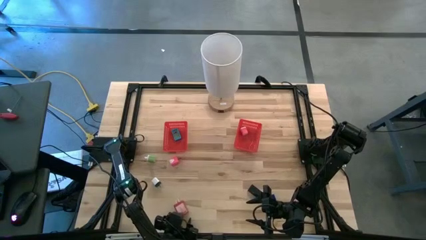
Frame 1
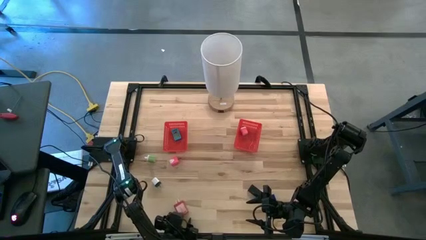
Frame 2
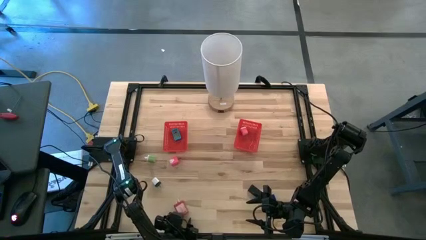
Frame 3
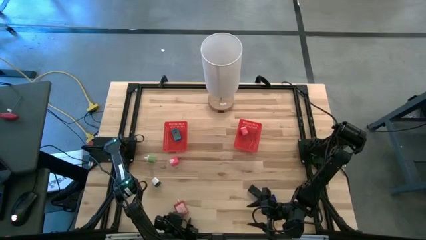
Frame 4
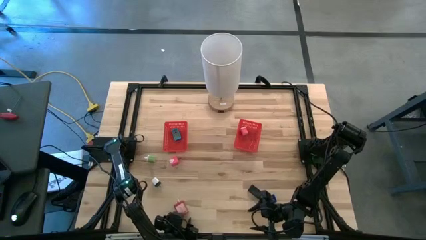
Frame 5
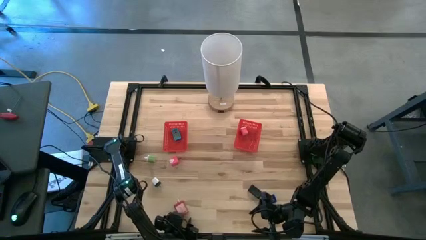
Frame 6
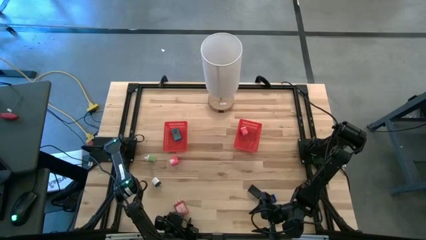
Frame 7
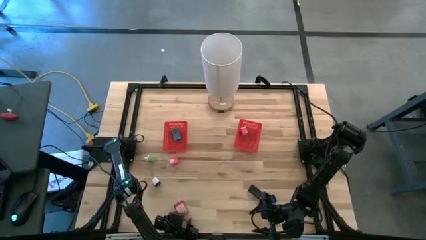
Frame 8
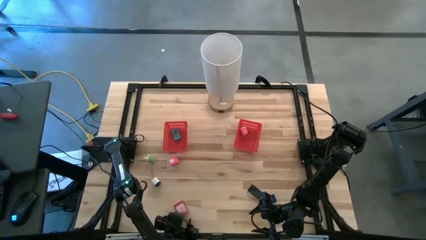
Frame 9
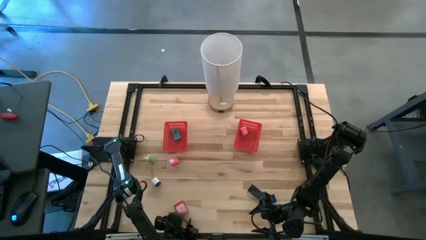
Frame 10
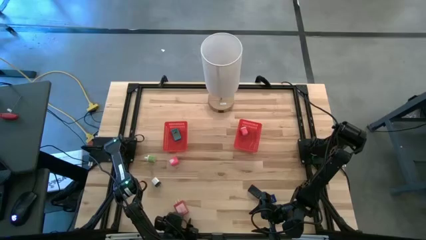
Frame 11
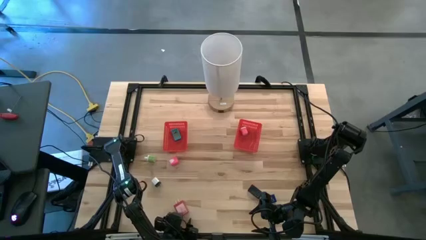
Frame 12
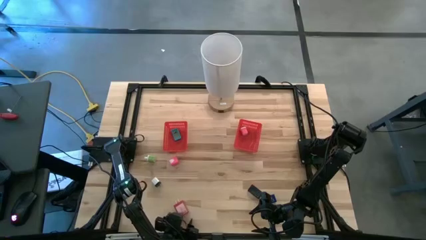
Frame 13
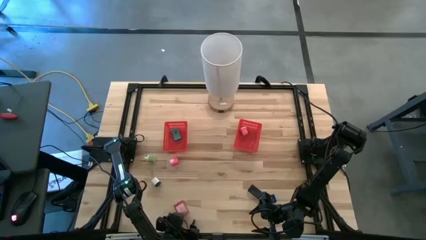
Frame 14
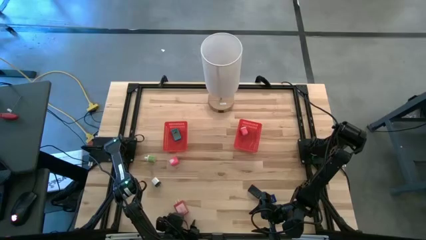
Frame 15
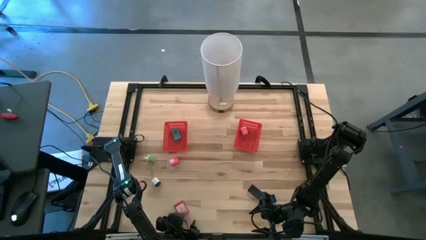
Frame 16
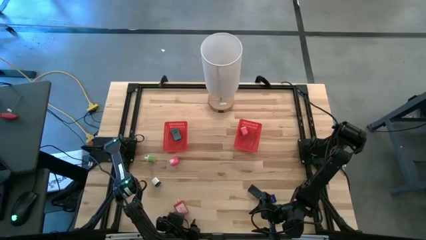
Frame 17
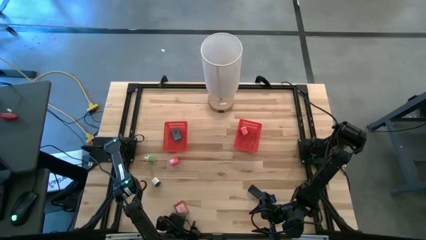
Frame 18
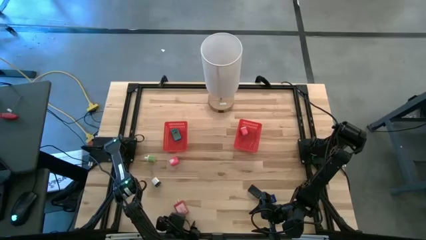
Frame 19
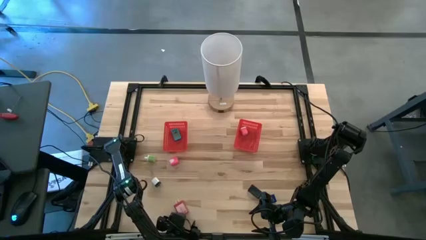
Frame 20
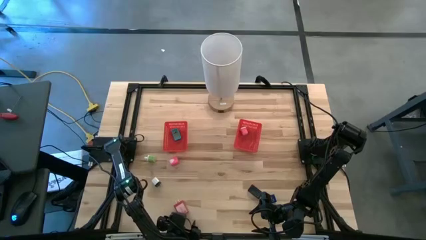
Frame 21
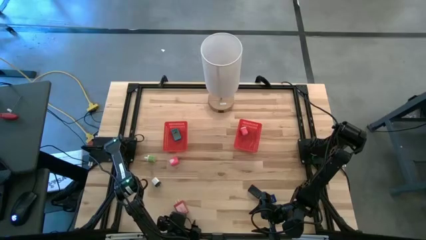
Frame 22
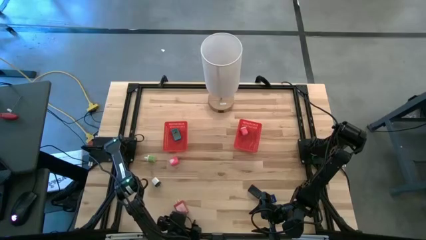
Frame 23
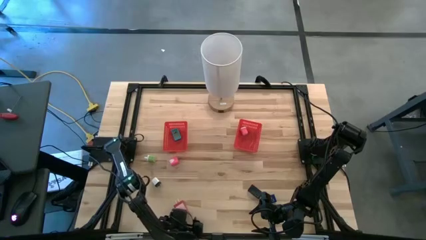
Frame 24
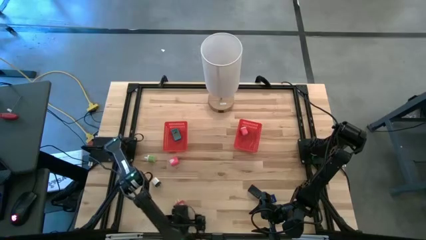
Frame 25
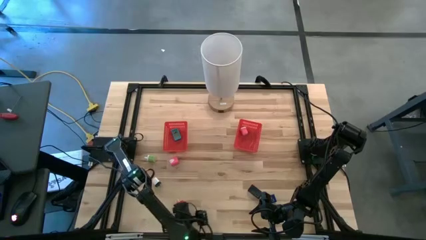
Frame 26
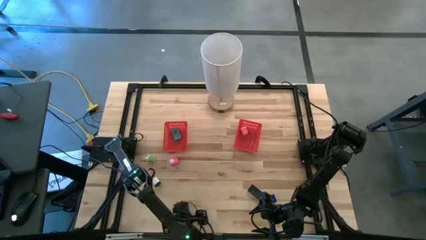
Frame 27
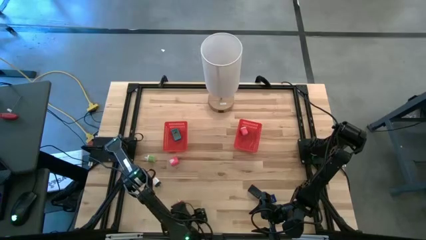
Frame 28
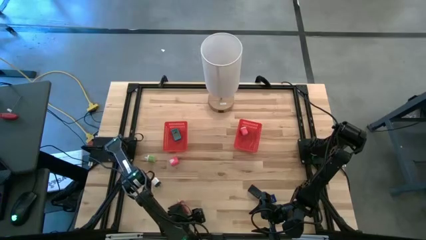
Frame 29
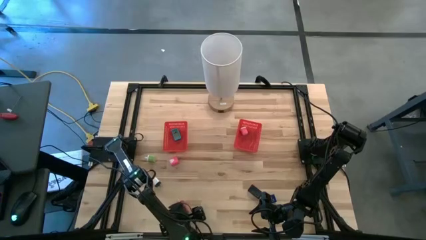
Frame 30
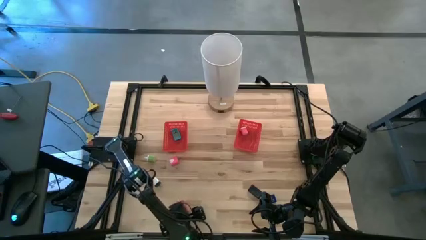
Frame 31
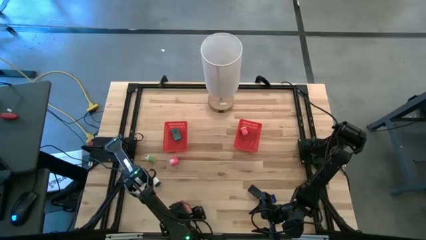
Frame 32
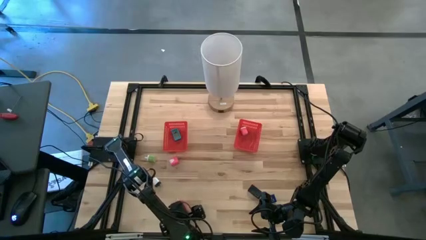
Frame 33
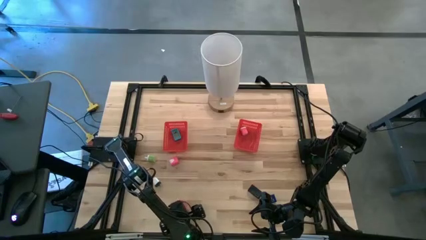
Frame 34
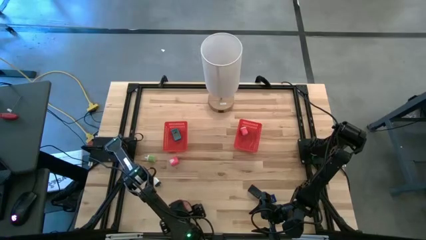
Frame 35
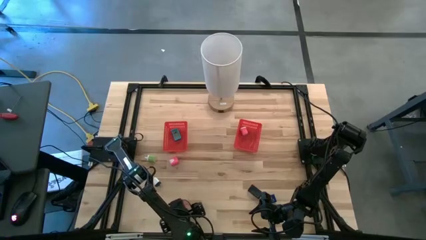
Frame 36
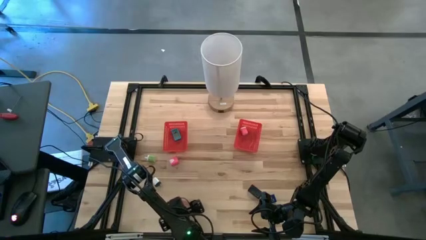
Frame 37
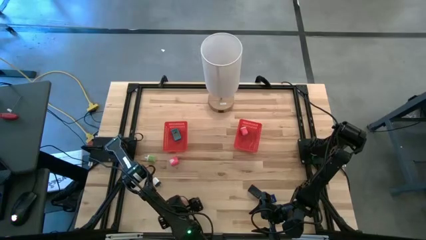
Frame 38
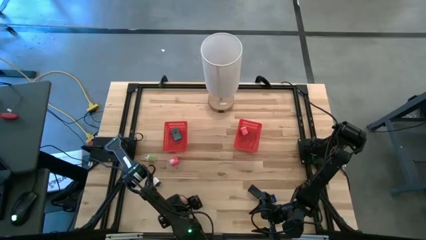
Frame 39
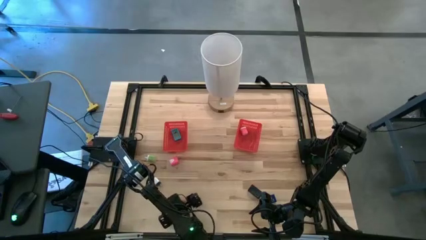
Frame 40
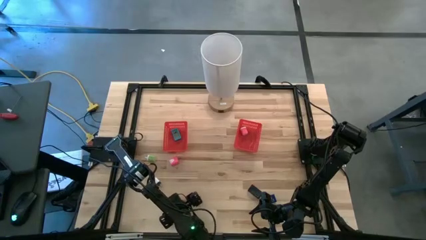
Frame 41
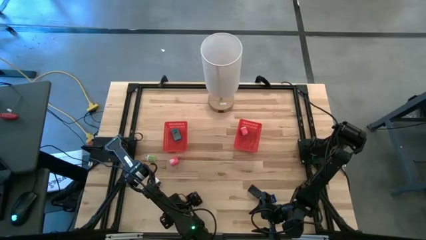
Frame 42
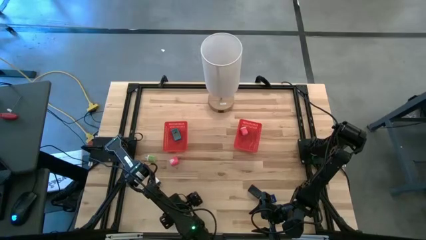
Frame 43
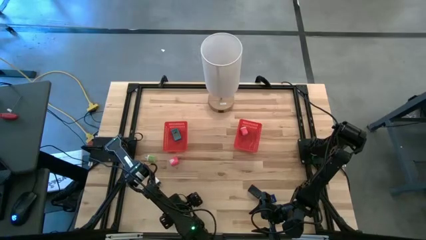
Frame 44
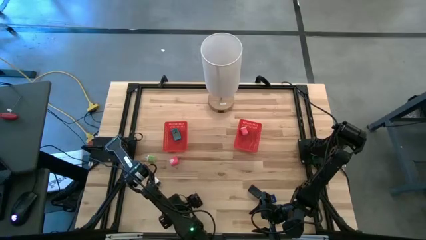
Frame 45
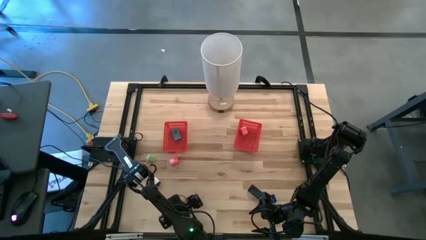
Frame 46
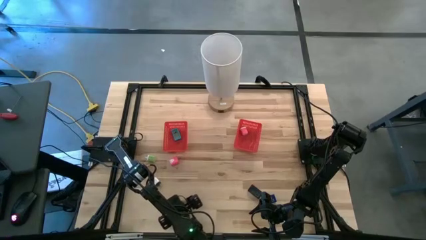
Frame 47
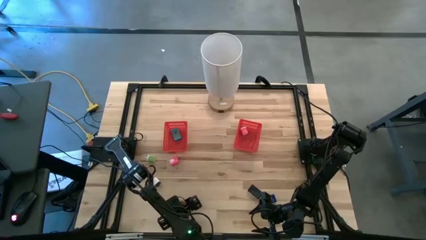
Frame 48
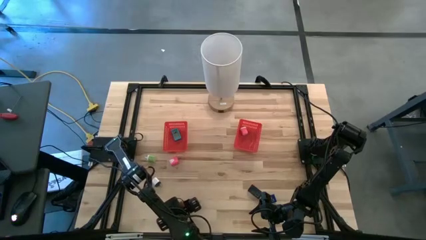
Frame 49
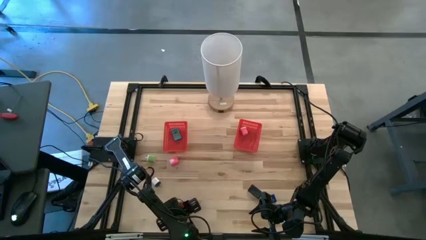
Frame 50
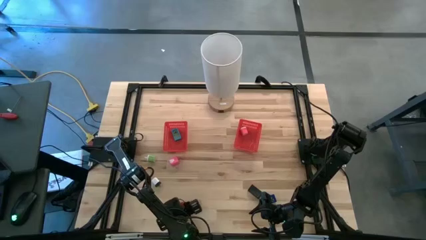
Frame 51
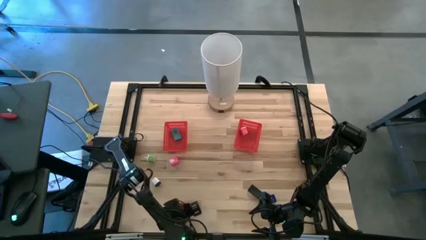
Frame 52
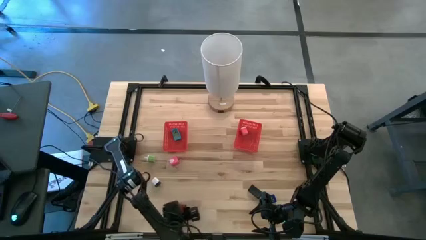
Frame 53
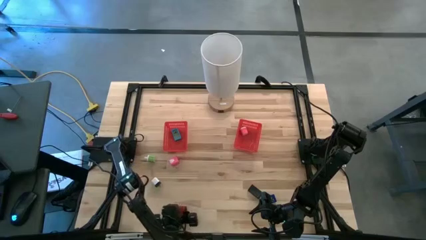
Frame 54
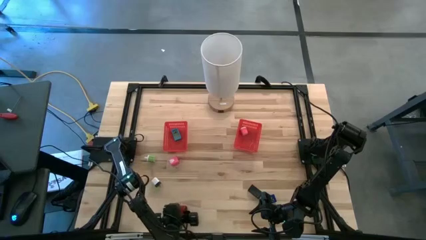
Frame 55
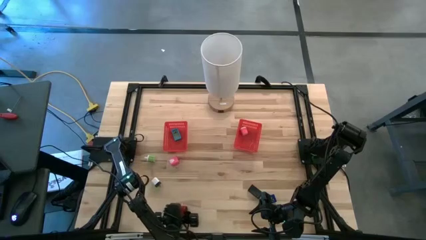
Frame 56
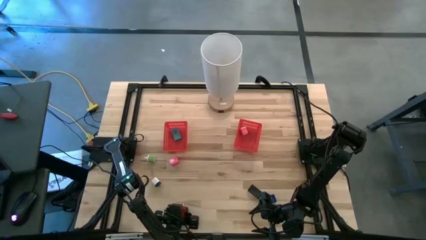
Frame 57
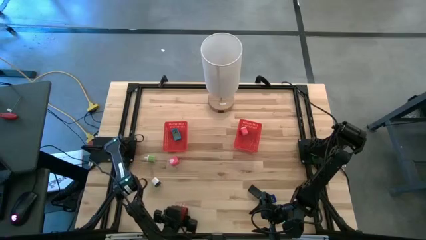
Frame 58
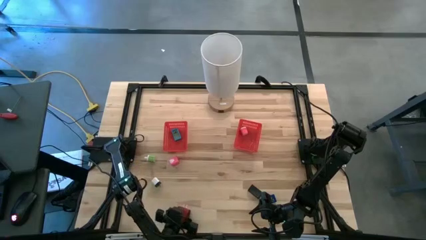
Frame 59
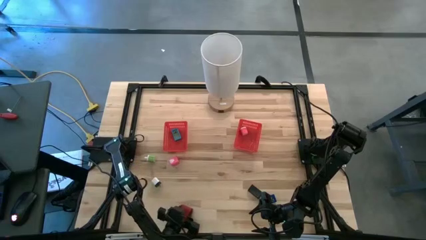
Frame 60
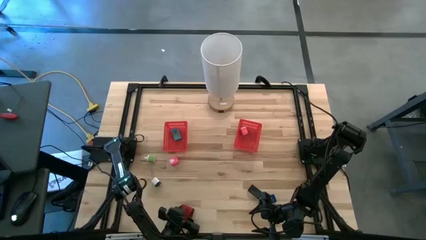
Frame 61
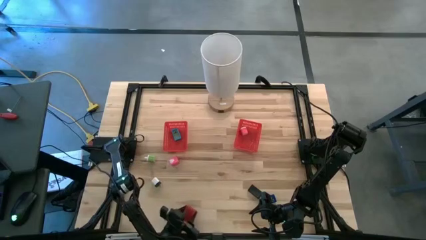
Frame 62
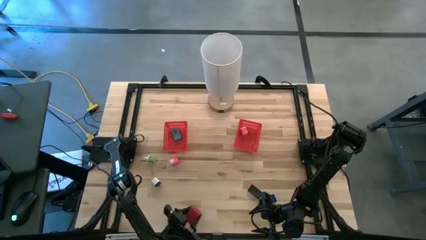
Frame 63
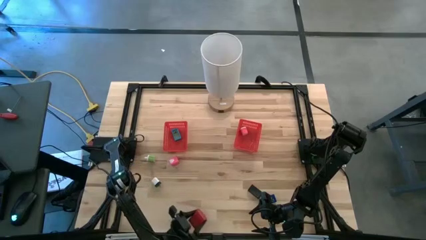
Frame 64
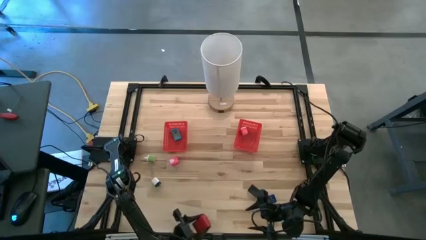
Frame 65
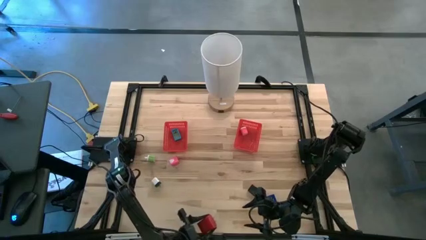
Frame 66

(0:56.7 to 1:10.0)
Task: Pick & Place Office items
Put the red charger adapter into the right red bin

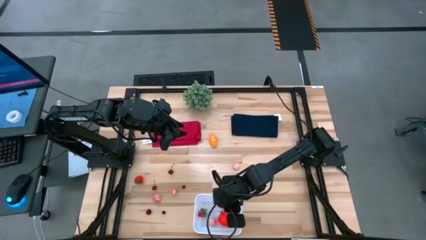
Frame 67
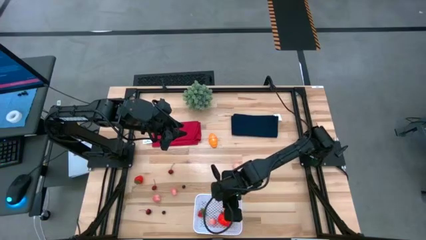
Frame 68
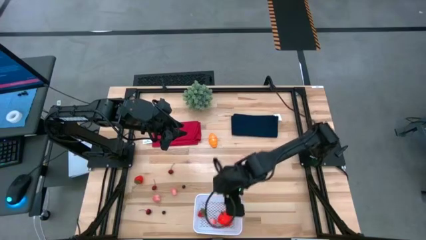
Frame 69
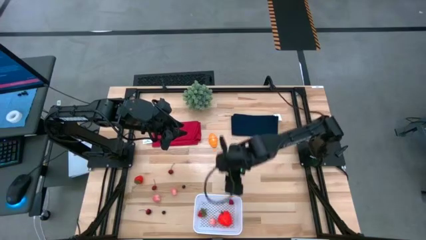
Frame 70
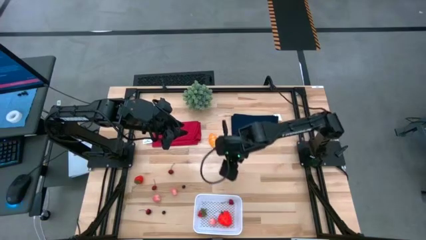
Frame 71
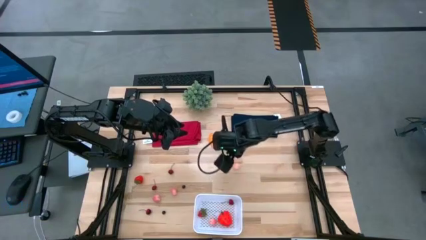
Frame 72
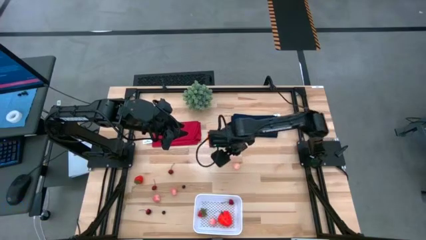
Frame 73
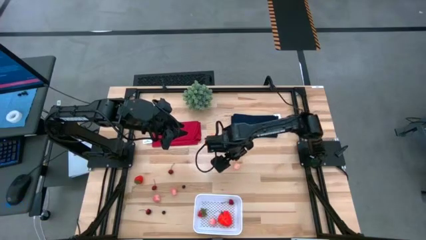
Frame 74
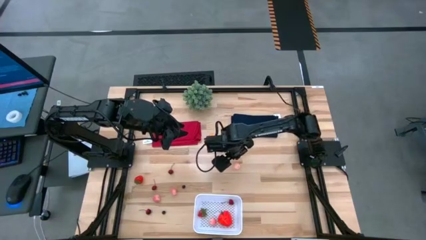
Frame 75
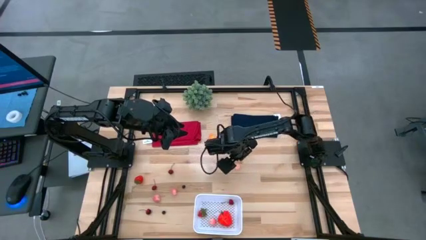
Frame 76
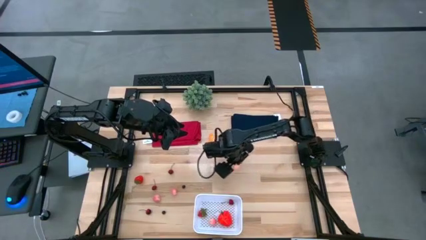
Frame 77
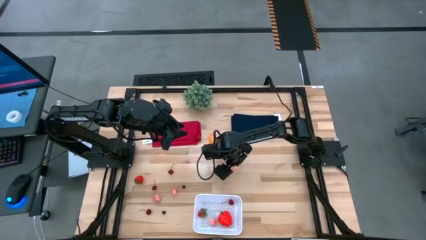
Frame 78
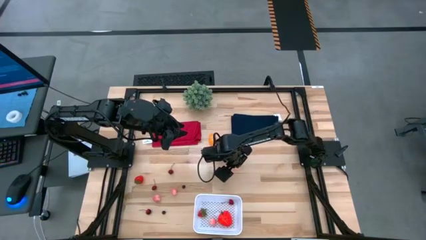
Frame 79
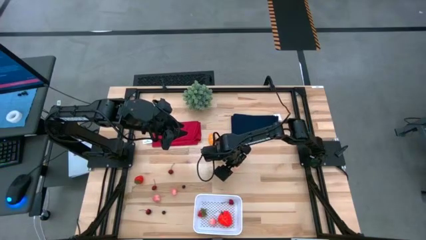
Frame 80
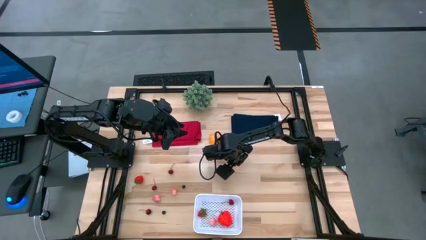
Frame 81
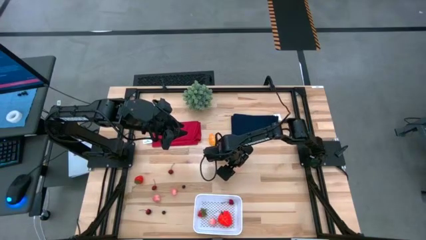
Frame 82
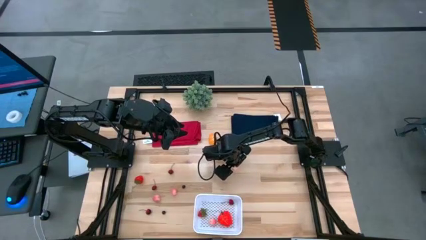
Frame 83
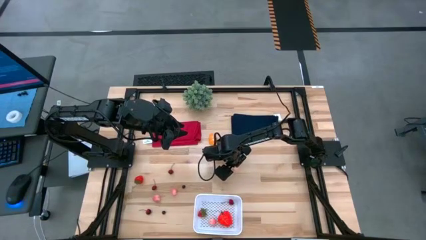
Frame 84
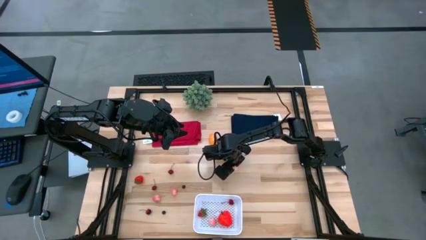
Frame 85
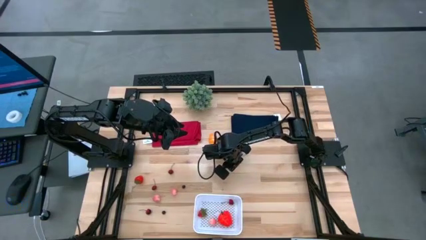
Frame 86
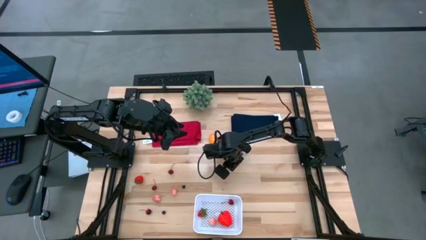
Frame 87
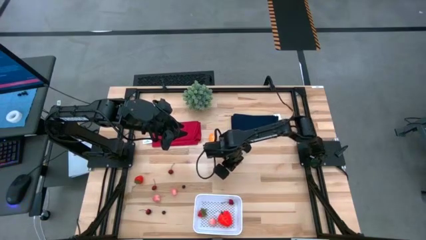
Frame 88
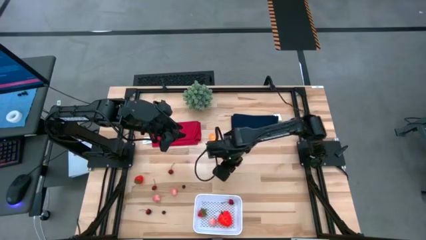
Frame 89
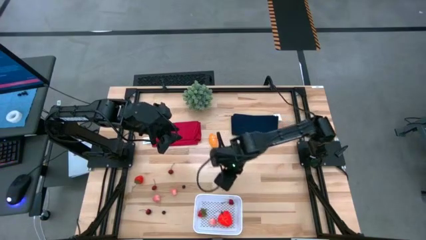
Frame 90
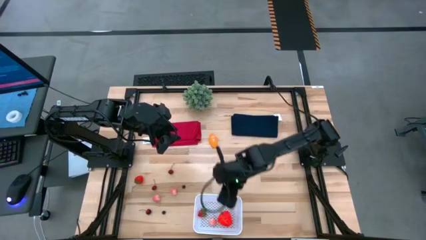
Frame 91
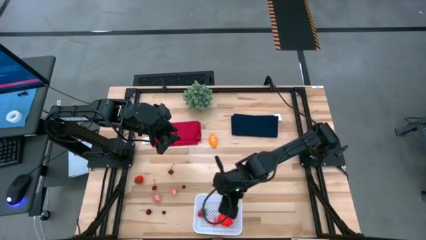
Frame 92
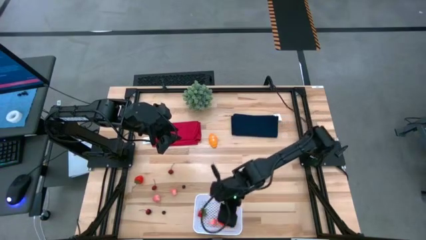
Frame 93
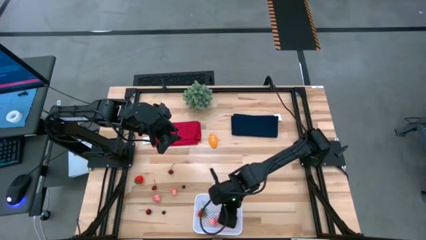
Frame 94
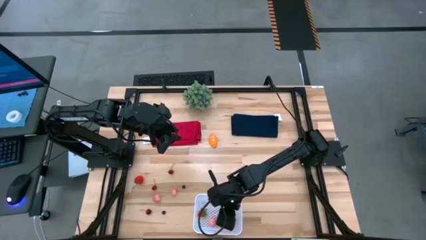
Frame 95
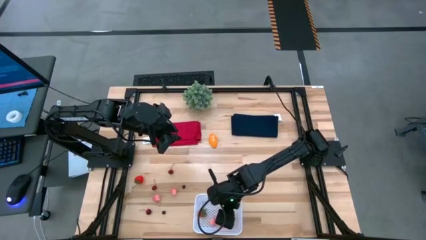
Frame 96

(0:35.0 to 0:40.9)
Task: Pick and placing Produce into tupperware
Put the right peach into the white bin
